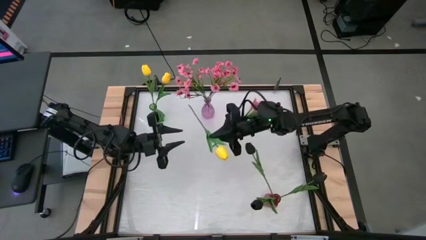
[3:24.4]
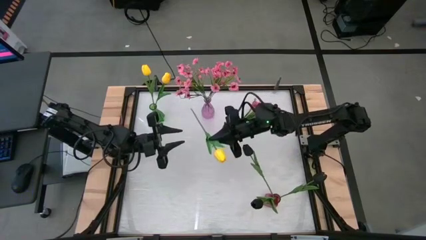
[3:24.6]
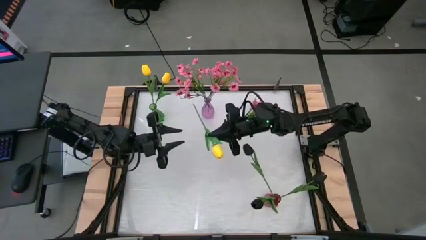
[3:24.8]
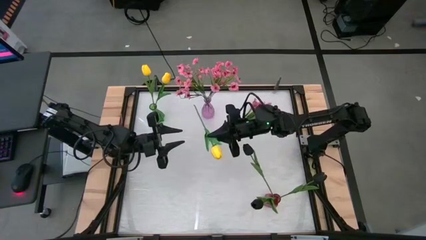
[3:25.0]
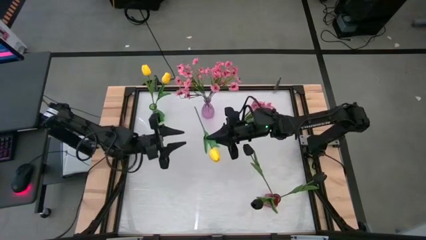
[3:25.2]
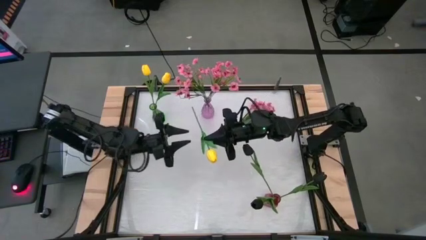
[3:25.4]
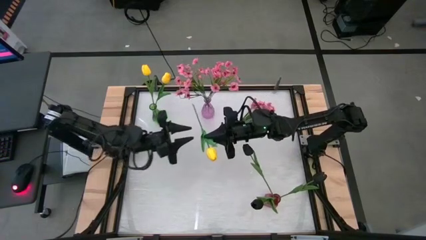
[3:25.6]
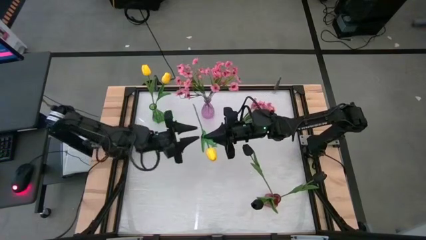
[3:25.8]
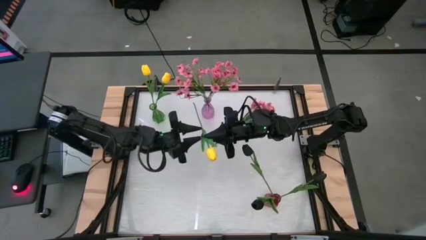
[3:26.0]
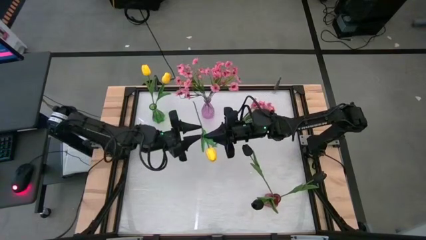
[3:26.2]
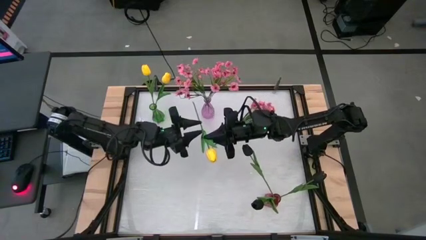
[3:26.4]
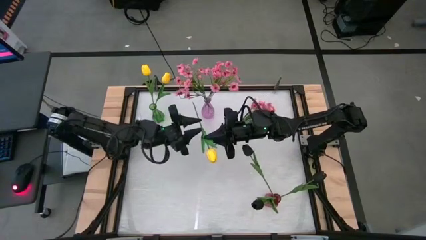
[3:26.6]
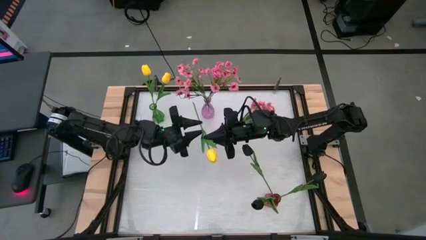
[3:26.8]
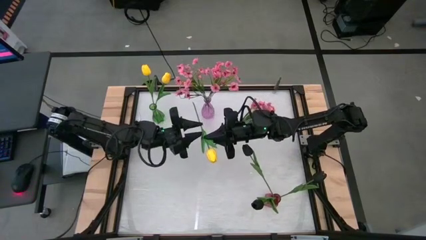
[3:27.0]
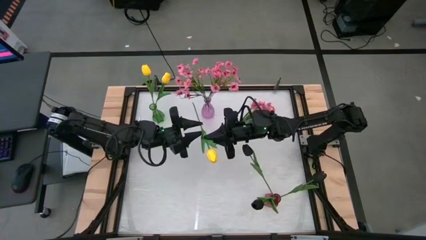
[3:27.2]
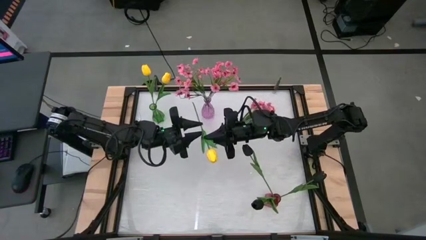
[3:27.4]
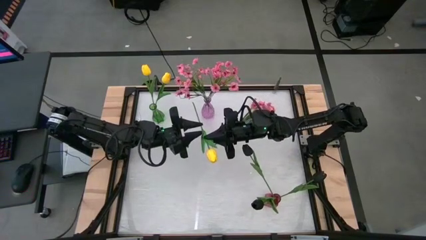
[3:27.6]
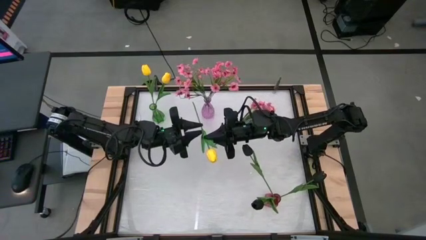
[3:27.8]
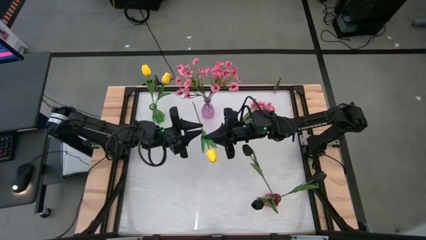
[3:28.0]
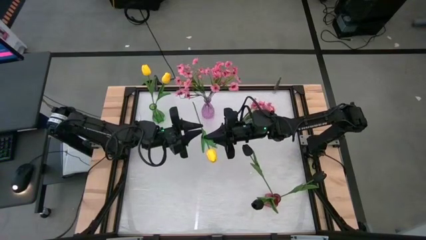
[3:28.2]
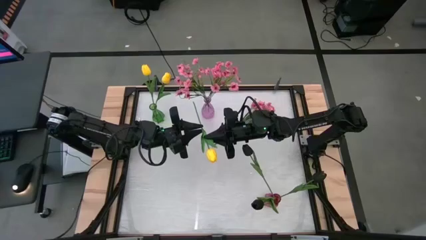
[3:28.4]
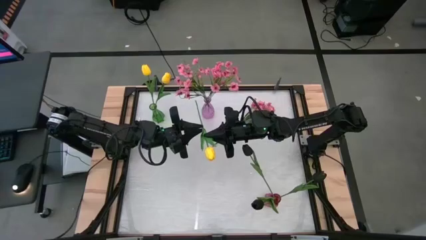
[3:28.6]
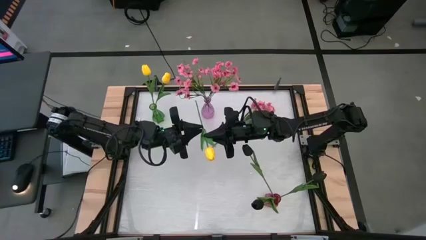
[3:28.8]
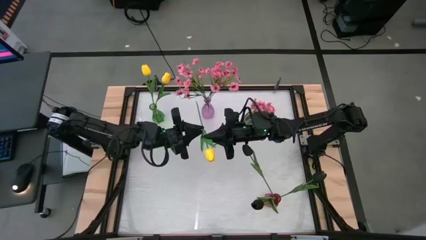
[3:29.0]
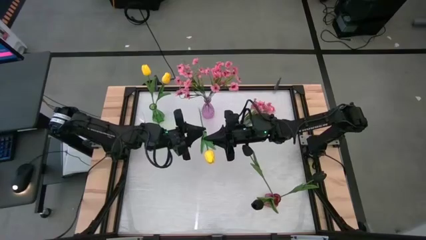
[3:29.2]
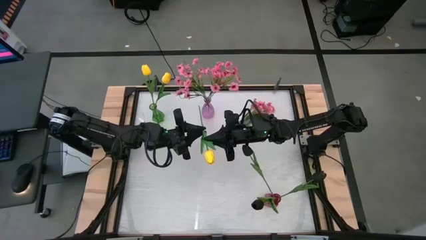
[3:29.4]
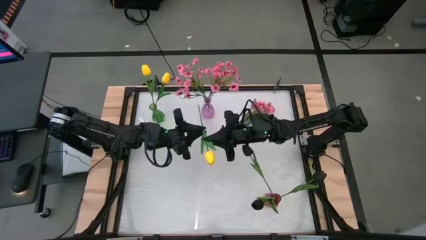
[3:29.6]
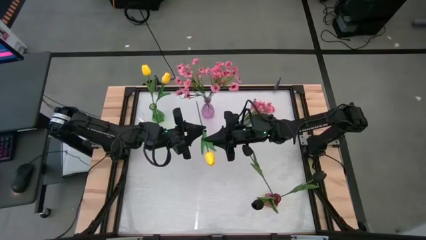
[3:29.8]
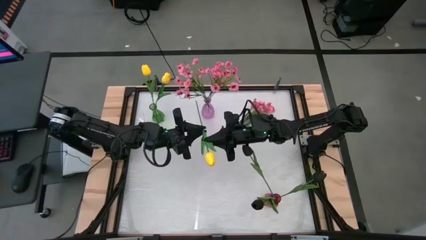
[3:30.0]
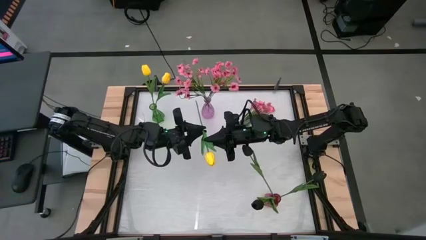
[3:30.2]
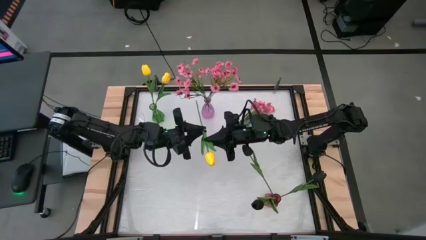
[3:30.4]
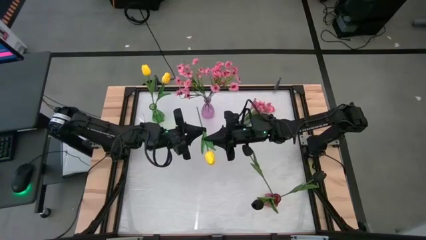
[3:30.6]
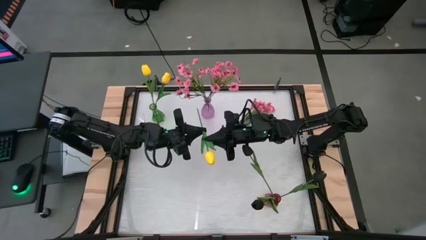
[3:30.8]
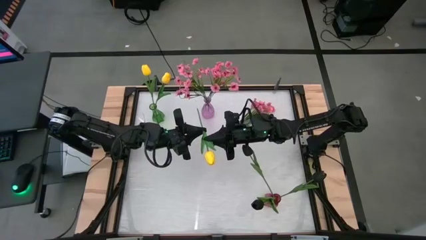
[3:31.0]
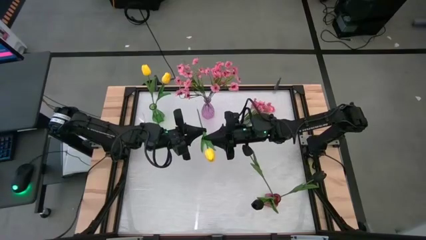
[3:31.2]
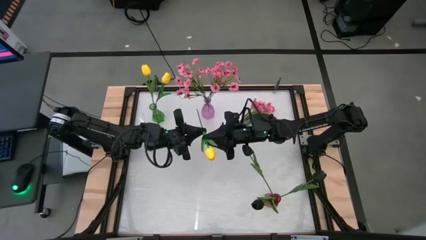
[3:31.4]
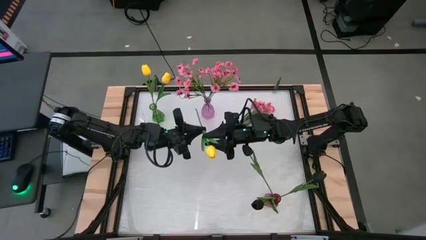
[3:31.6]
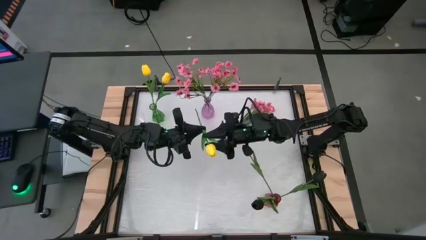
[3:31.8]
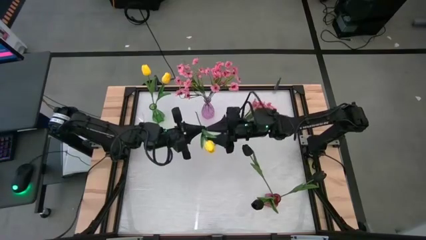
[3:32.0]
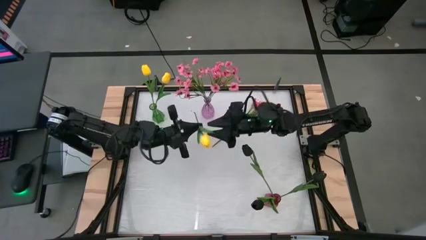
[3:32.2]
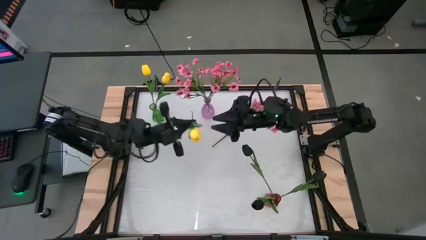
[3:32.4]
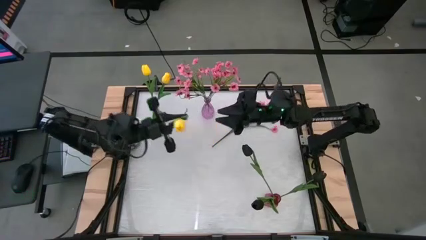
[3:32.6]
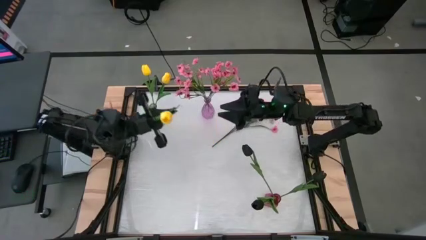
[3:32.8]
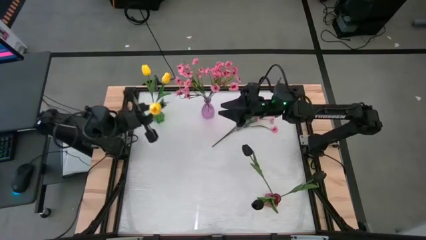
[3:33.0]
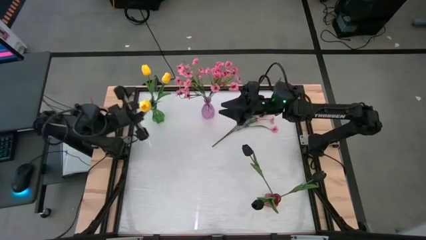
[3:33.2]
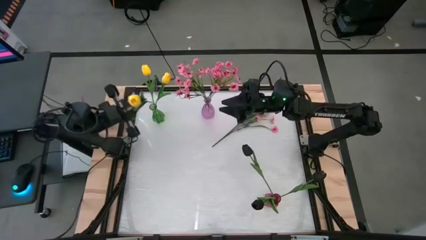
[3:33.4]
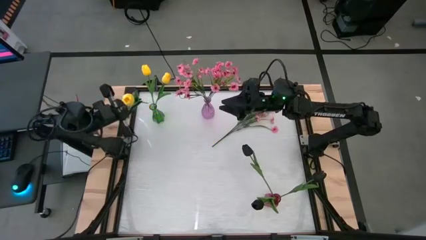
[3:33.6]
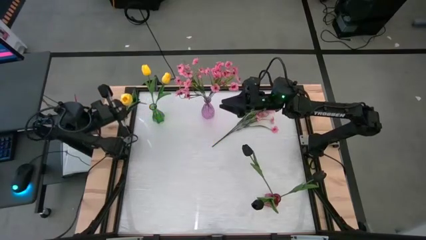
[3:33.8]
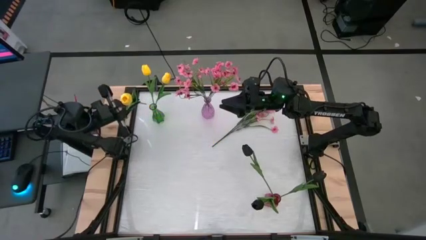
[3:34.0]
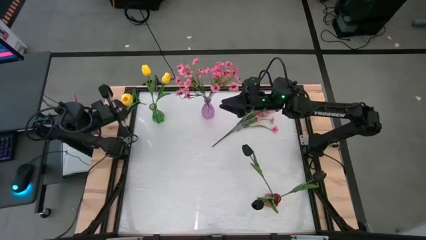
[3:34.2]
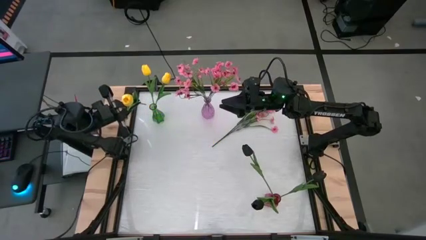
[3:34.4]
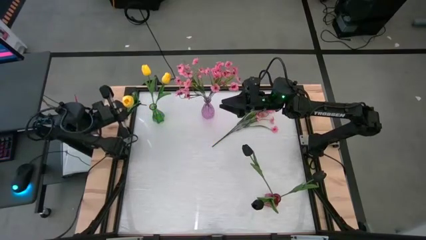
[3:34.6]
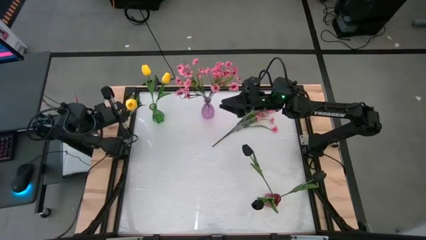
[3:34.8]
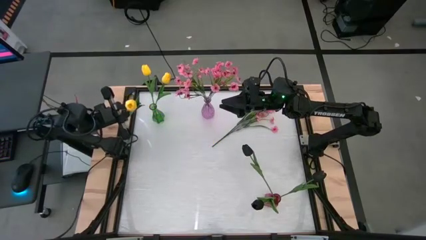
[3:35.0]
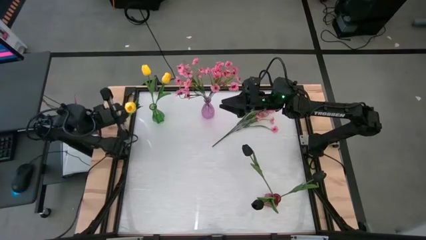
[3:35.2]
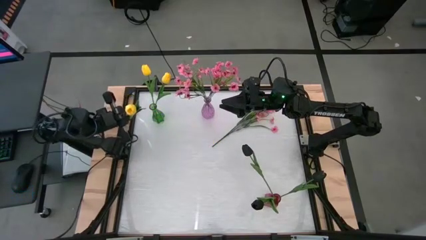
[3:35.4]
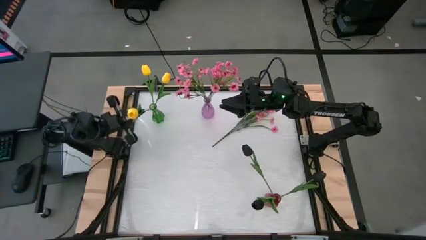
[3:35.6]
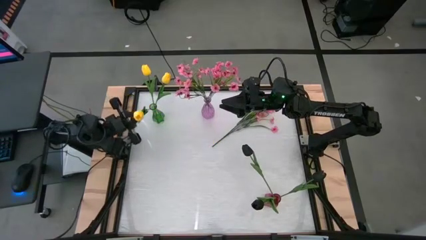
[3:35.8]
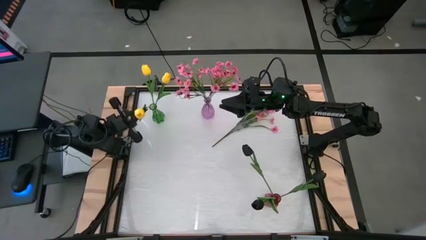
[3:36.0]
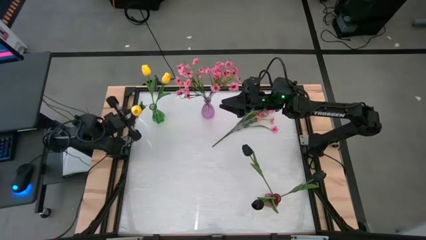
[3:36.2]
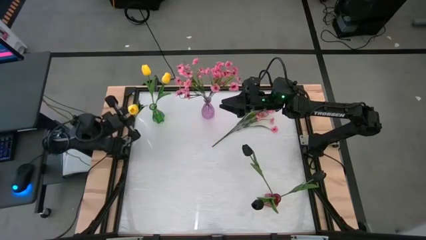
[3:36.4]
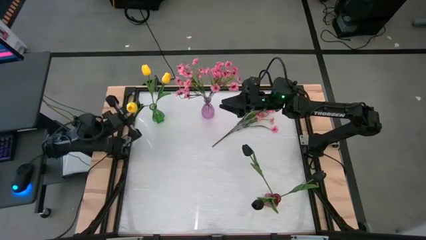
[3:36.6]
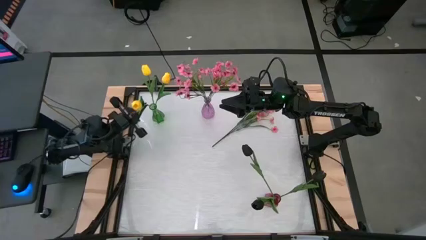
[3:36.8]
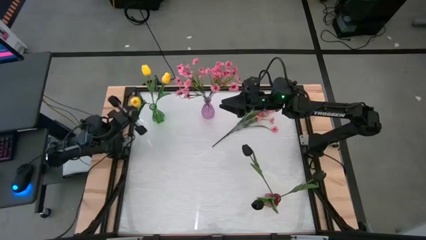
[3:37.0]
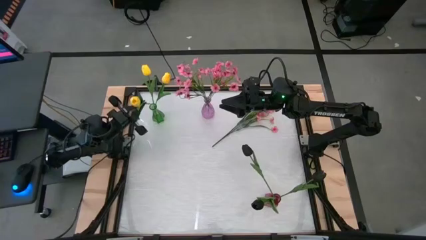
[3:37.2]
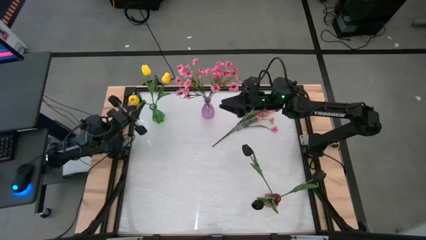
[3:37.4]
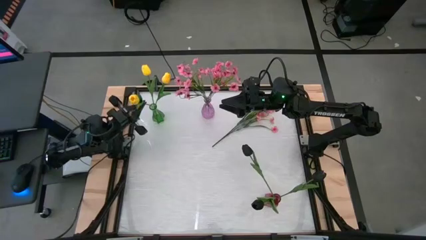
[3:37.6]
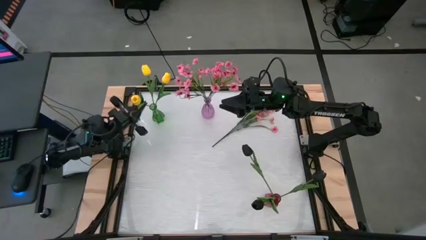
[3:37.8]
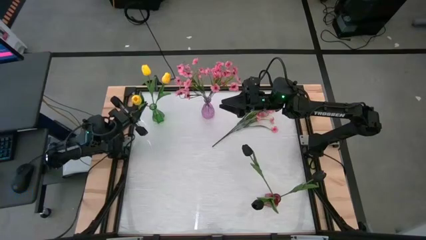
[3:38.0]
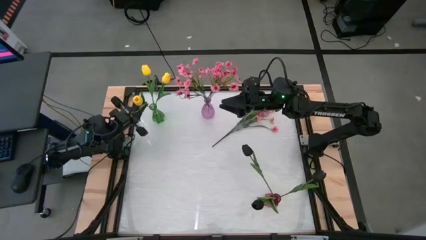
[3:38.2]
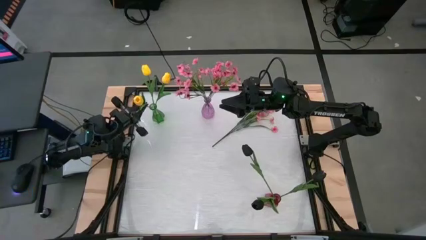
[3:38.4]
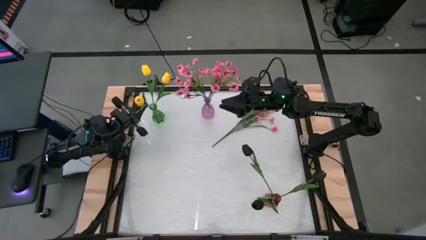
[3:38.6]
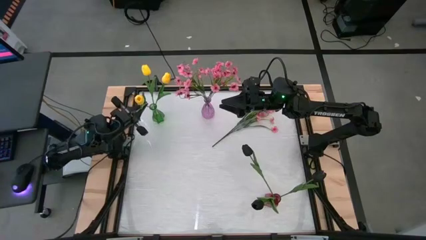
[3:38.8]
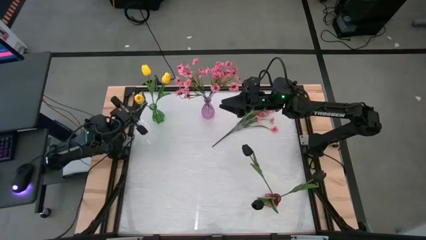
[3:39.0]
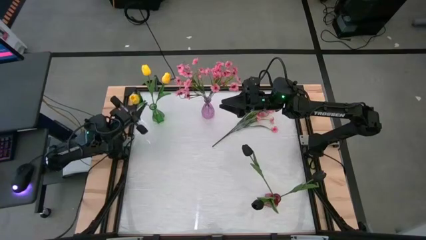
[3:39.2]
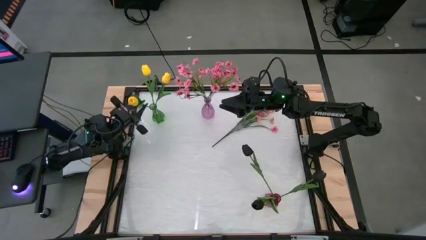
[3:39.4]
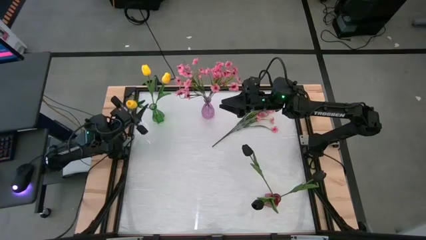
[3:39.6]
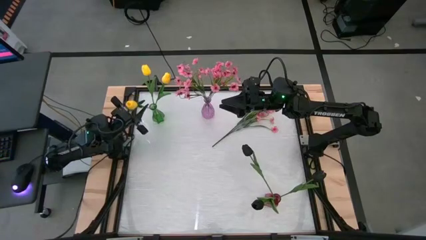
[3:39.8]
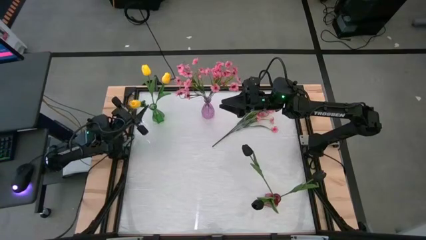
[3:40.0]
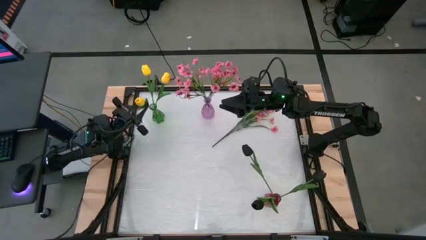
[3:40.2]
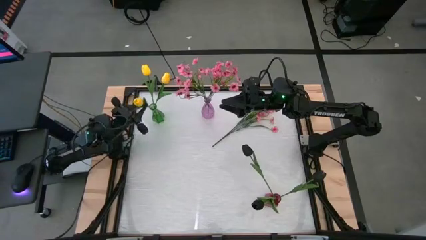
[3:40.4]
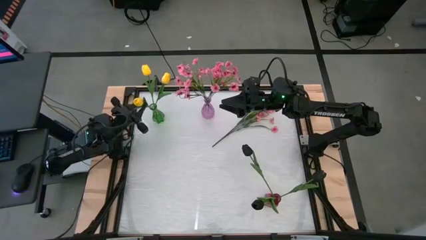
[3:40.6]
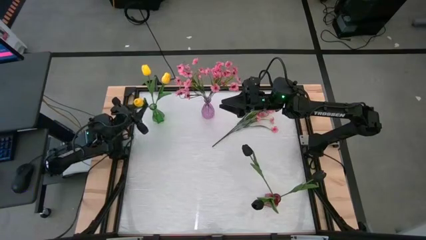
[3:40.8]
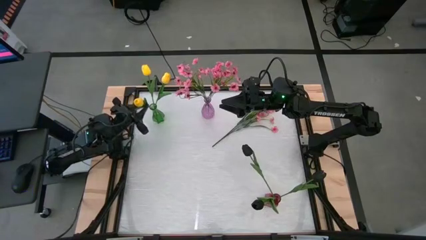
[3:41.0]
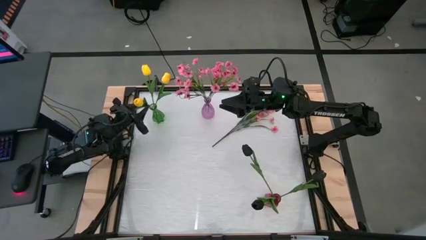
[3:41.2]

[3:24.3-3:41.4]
Task: Sort flowers into vase by color
Put the yellow flower into the green vase

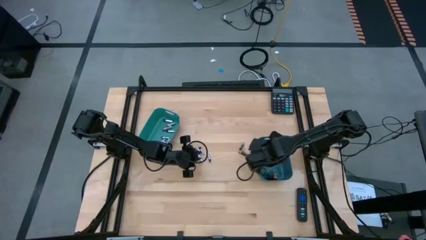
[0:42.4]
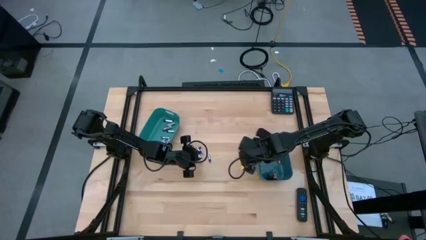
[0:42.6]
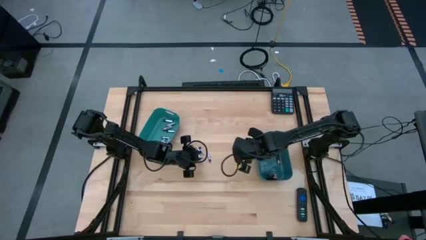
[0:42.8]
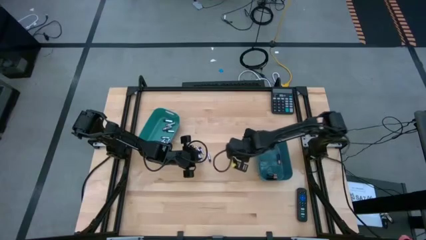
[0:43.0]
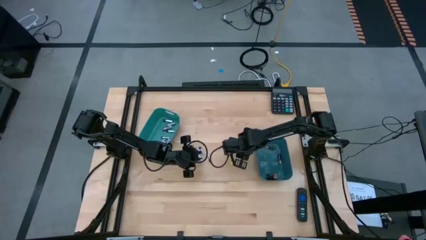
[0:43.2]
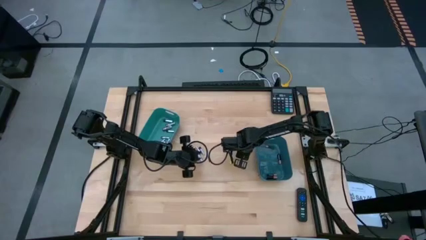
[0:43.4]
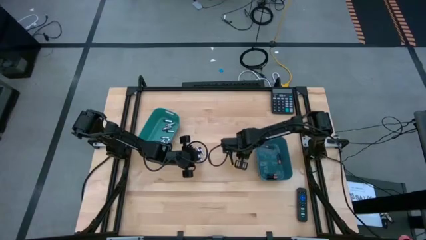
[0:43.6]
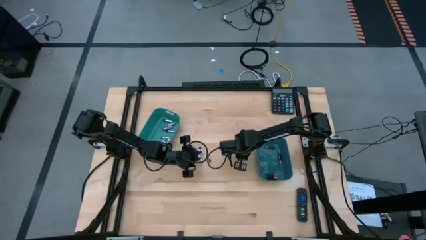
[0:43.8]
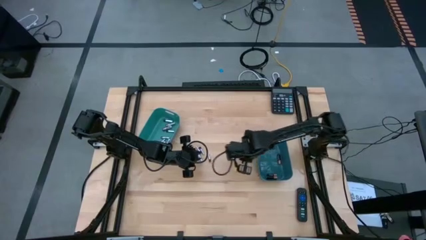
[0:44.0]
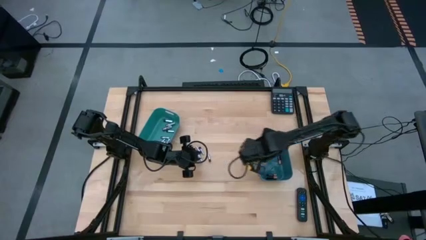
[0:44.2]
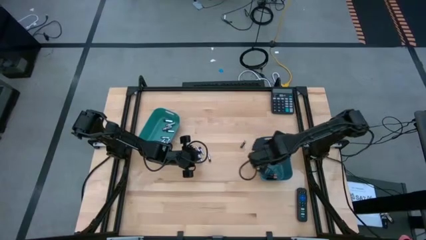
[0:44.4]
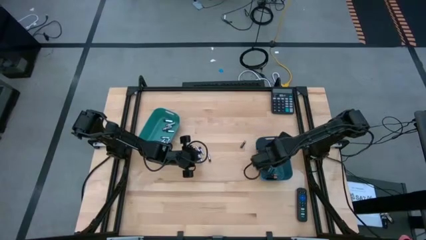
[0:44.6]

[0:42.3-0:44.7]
Task: Sort batteries
Put the black battery into the blue bin
